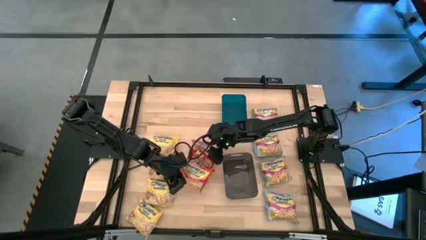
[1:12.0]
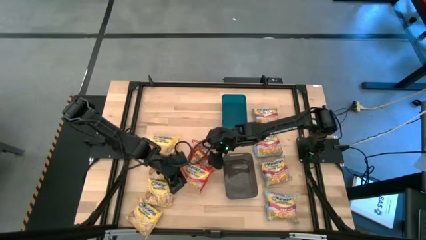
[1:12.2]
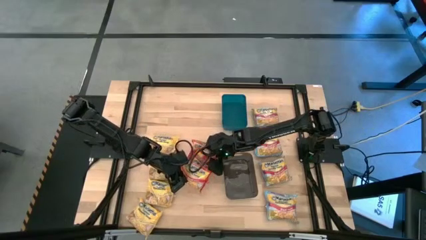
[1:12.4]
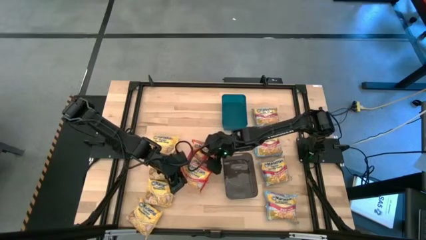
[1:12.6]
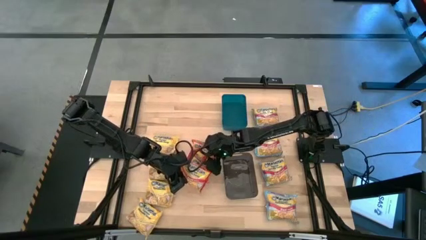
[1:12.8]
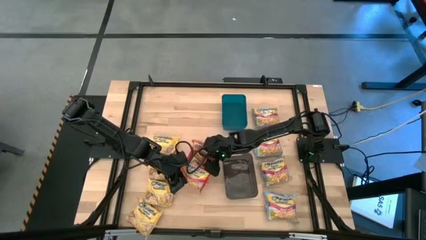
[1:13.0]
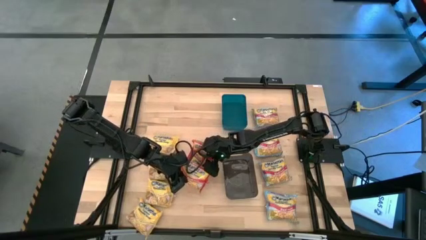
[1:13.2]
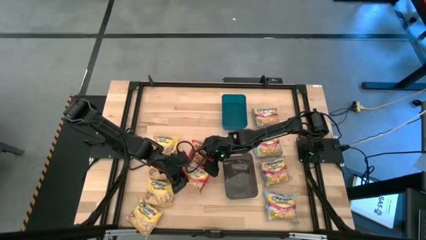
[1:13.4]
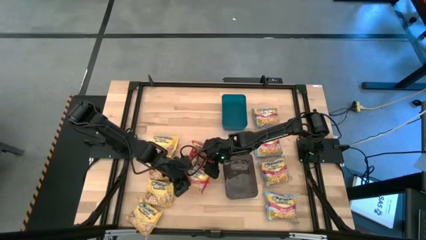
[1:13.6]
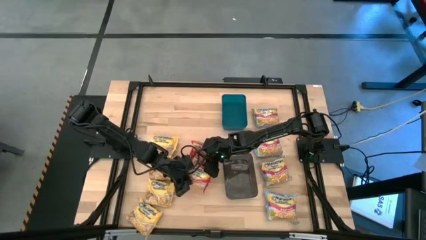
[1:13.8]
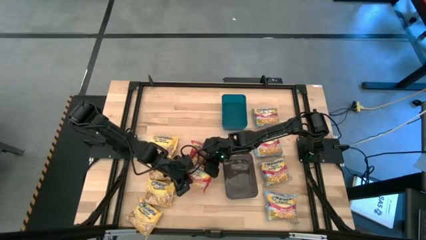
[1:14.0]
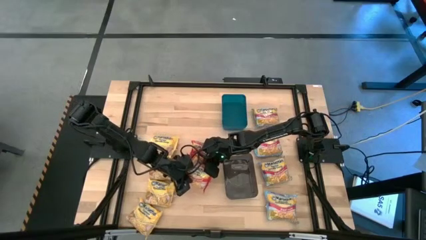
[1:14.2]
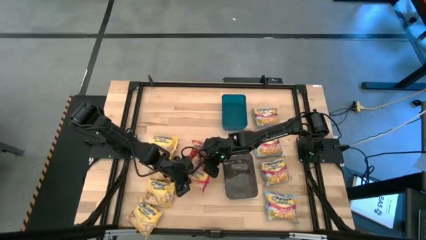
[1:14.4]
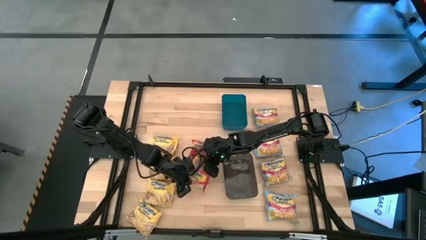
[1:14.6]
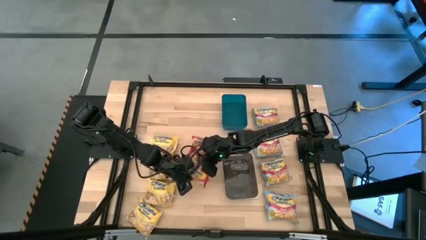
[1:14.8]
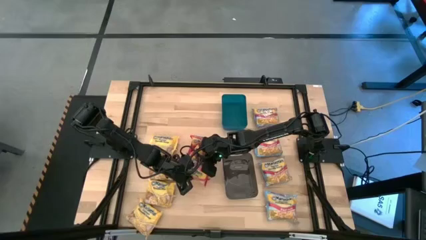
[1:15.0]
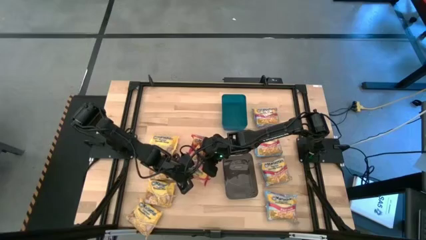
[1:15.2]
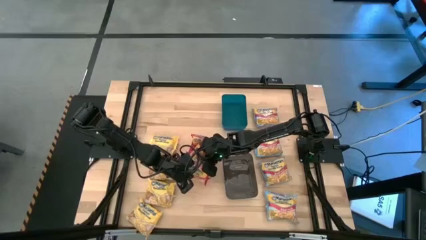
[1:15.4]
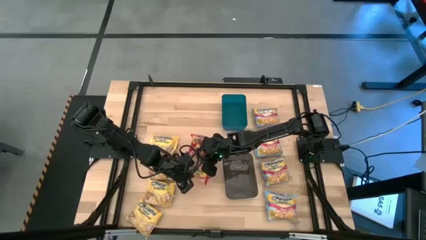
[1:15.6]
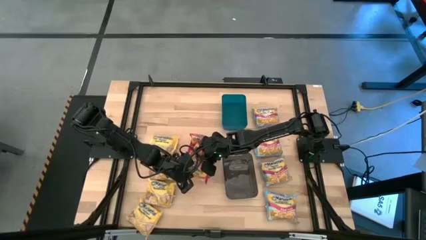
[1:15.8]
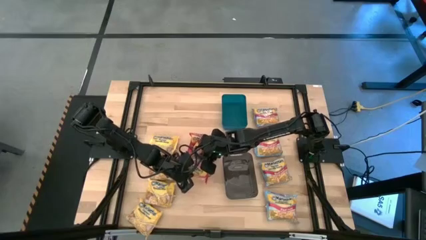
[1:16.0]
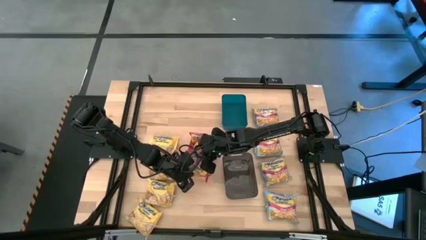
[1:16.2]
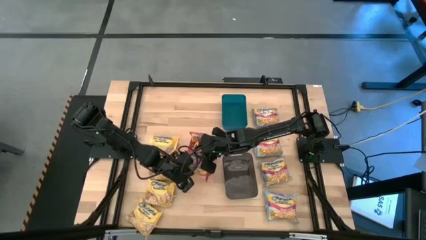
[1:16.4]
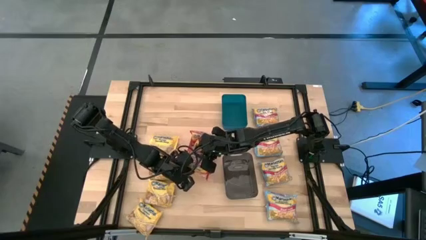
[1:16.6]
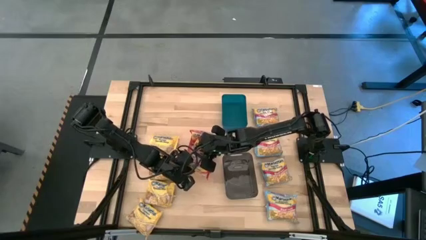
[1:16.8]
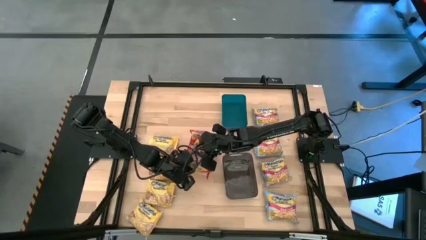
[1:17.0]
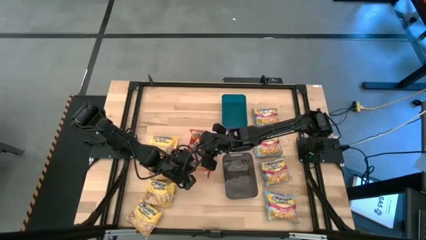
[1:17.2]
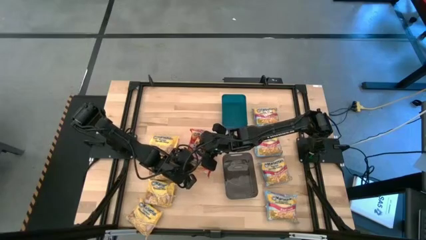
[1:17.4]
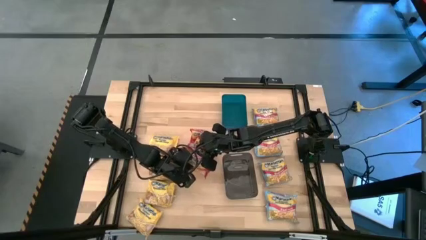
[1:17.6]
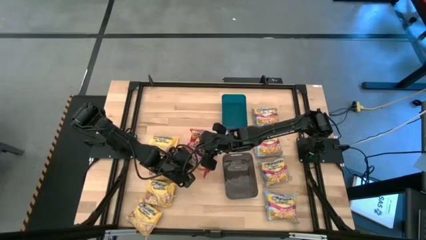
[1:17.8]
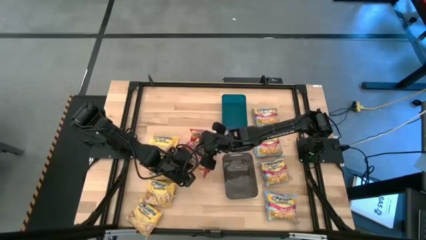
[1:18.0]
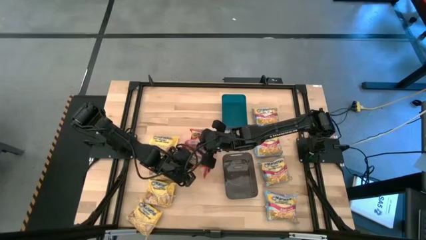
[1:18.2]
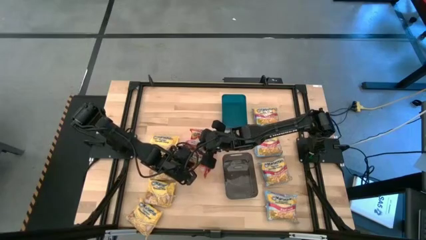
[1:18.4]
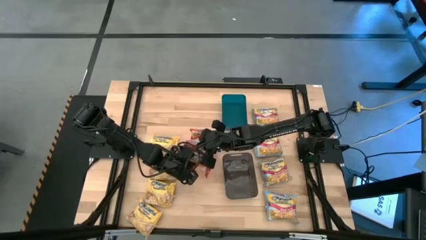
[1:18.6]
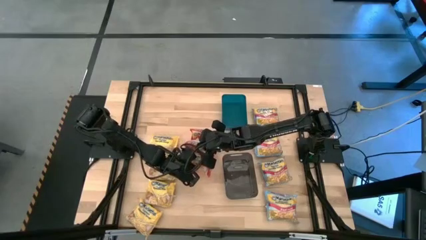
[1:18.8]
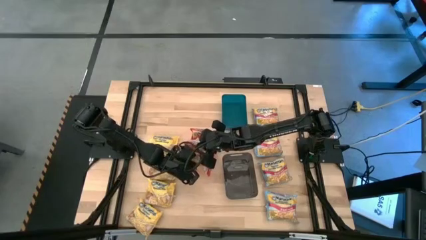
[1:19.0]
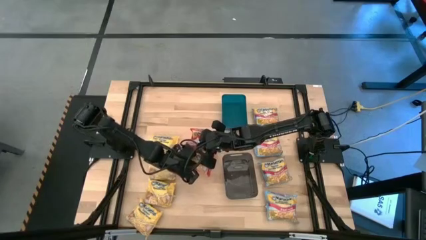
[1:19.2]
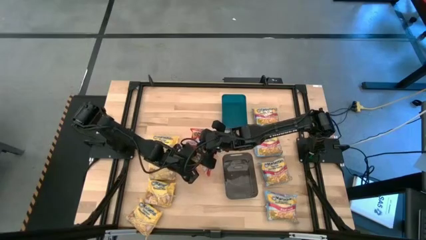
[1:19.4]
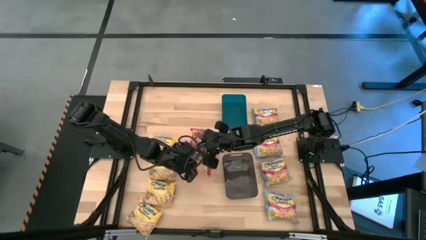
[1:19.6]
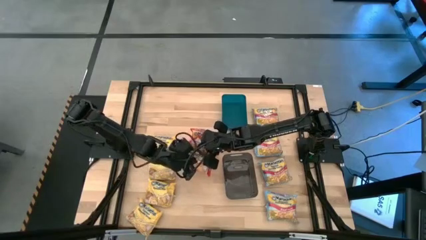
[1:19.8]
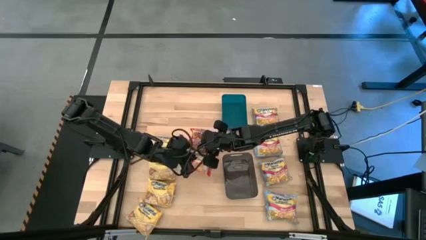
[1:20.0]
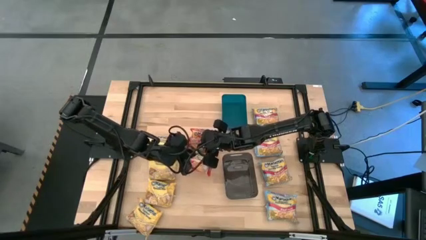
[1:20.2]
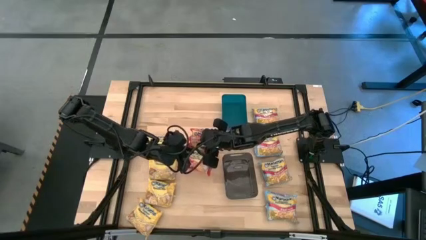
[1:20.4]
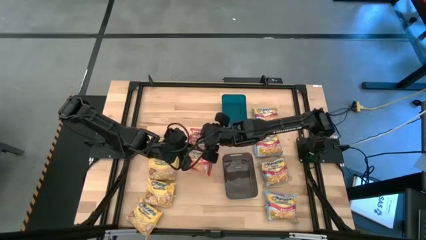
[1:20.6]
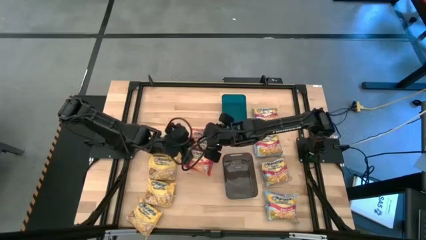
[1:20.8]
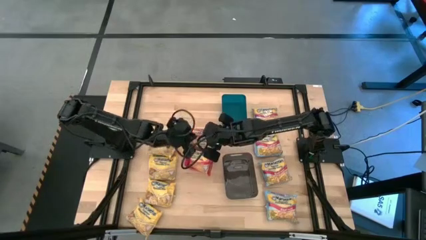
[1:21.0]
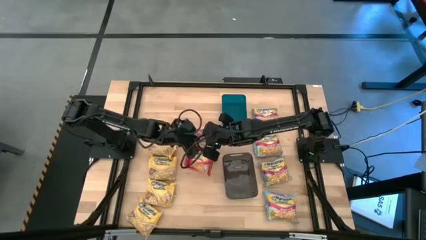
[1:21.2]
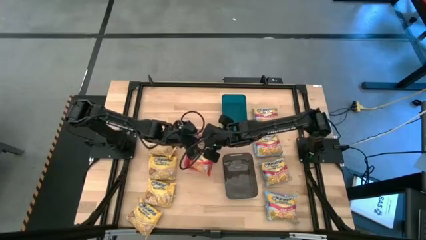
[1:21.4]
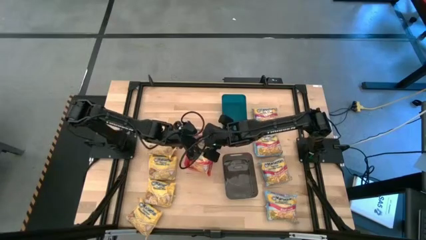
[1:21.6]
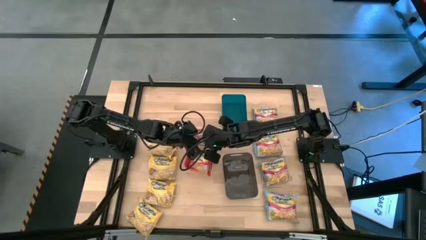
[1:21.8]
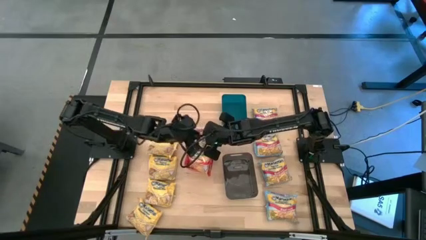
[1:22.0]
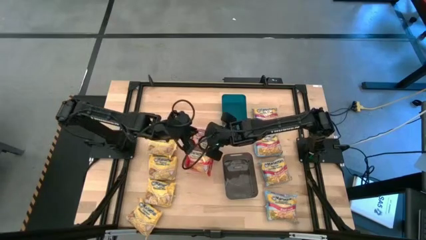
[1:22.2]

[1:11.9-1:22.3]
Task: Sort Maruchan noodles
Put the red bag into the red bin

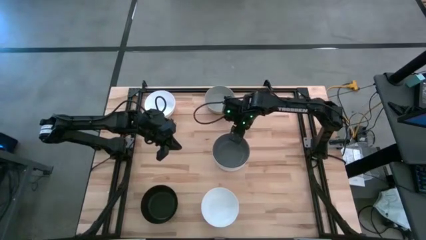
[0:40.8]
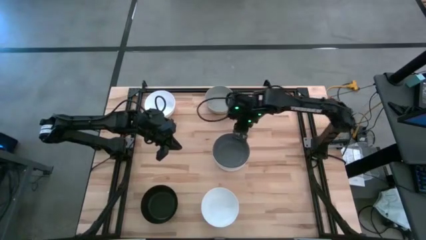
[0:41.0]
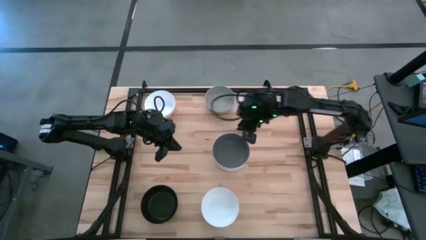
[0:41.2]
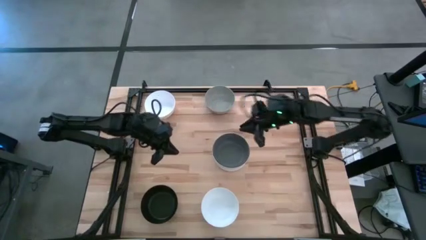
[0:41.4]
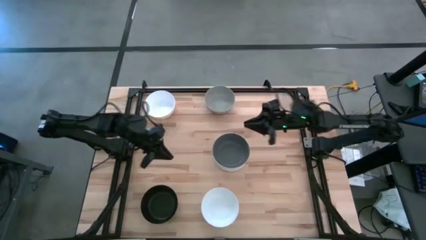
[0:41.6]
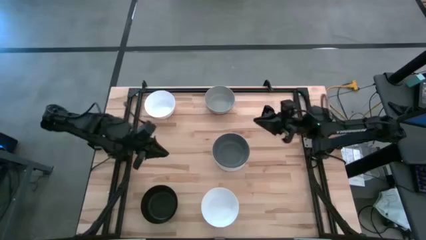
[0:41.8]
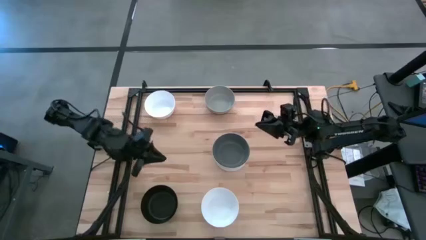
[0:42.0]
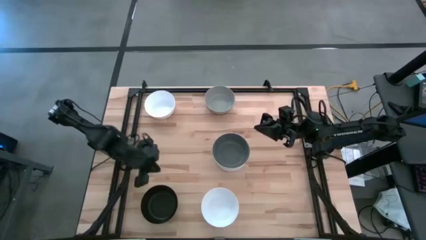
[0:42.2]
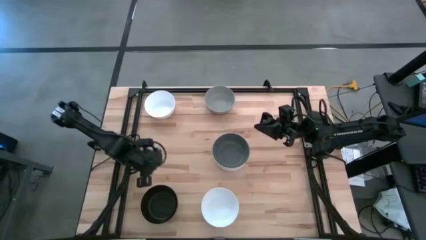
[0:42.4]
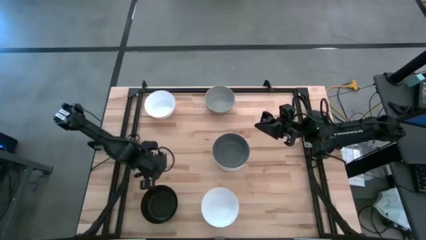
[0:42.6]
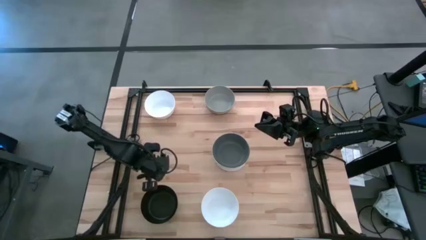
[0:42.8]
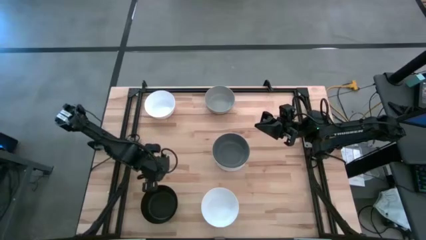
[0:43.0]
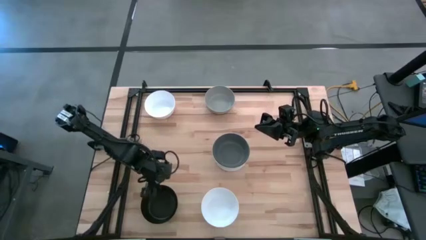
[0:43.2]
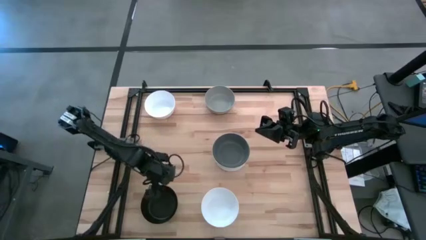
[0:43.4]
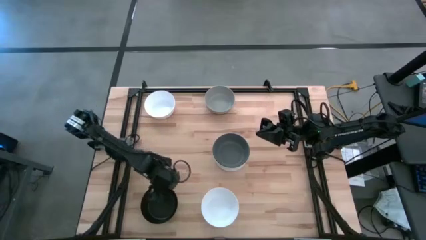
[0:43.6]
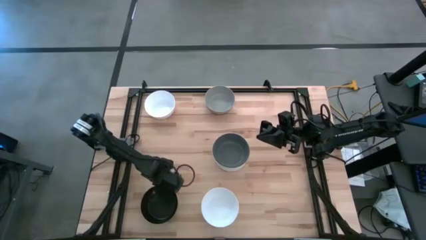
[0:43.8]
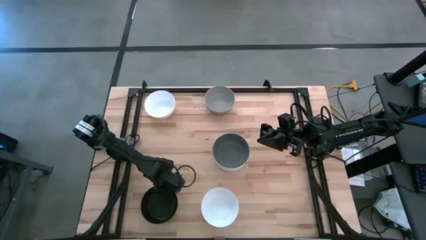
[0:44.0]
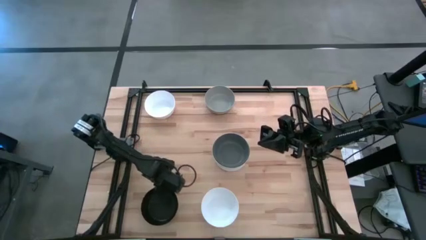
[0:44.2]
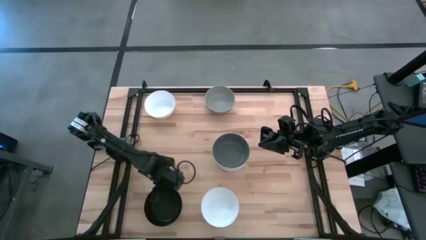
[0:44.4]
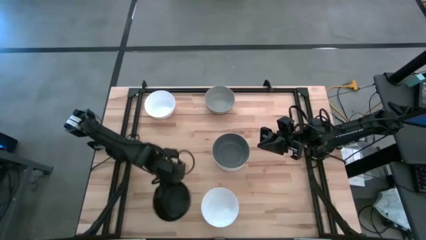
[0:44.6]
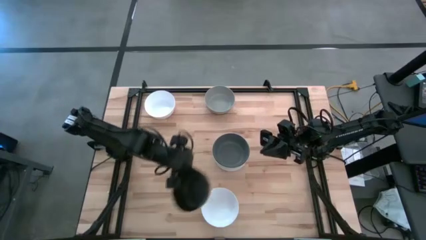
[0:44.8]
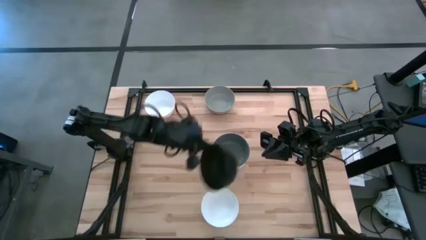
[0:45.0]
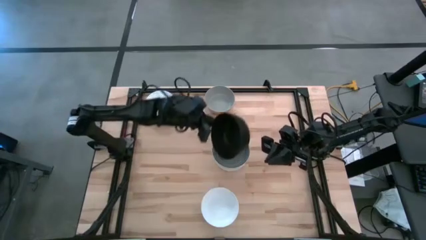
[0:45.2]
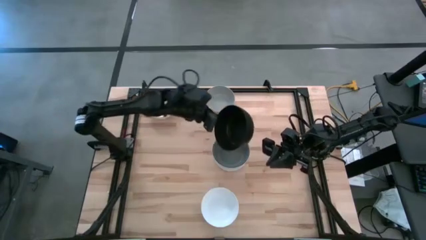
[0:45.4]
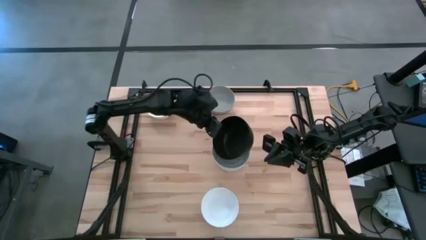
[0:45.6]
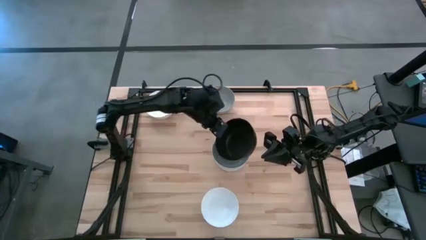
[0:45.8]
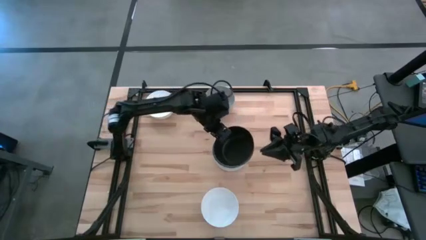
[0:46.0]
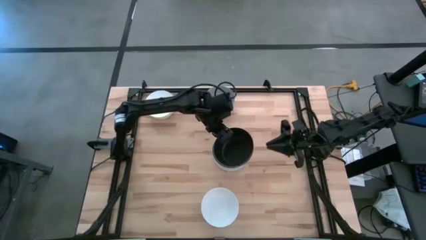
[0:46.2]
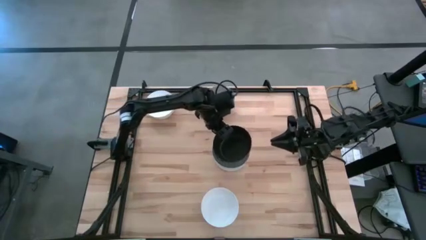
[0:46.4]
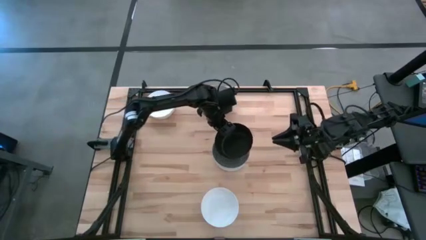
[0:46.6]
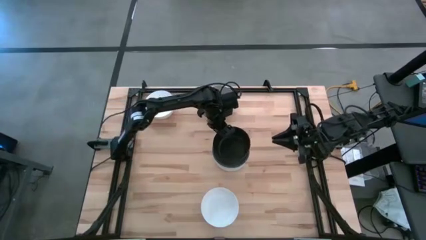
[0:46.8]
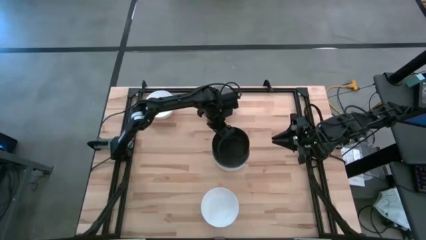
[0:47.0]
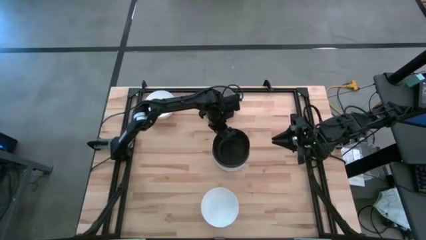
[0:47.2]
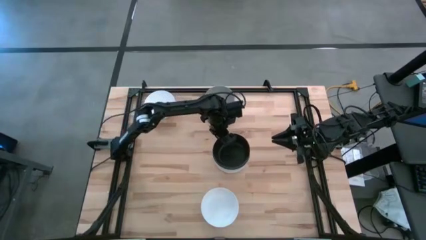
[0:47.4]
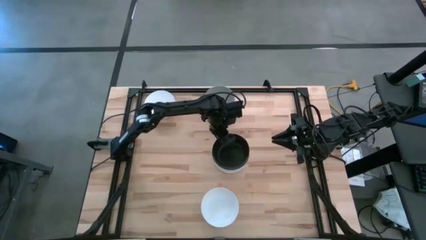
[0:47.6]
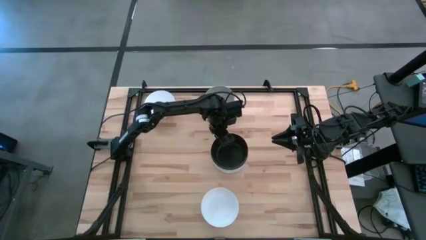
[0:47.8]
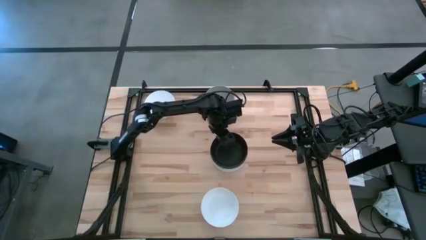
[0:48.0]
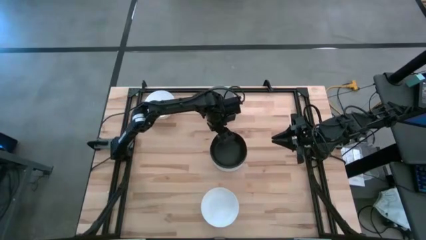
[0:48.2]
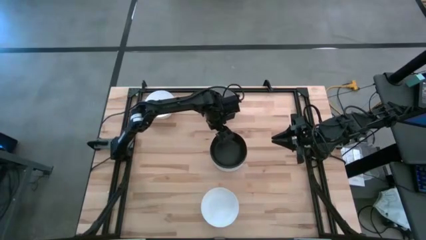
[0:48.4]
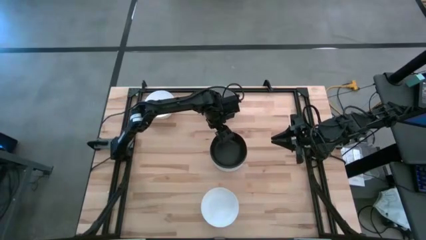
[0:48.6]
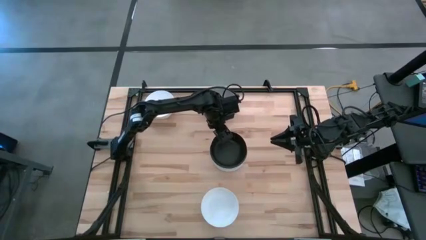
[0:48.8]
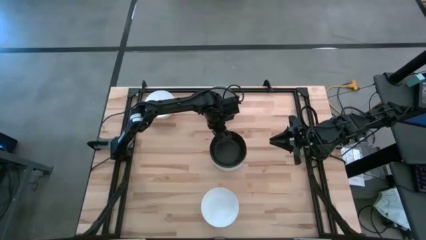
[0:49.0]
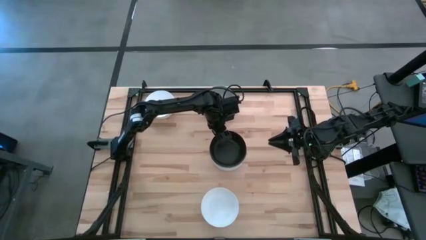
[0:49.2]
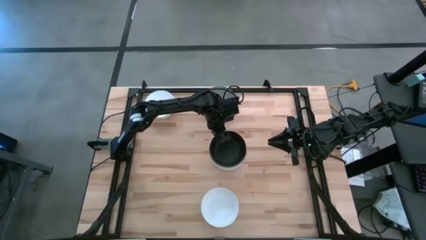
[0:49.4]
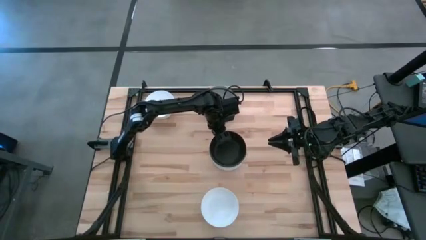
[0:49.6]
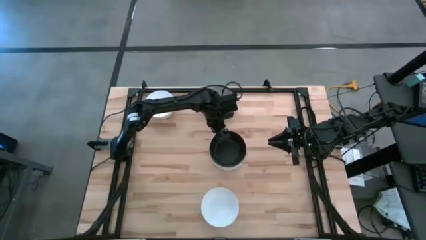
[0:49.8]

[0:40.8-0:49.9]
Task: Nest bowls inside each other
Stack the black bowl on the dark gray bowl
